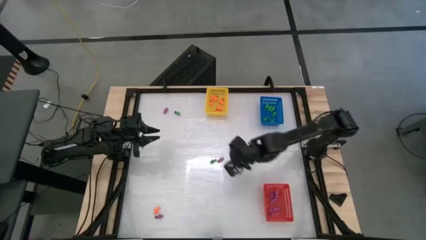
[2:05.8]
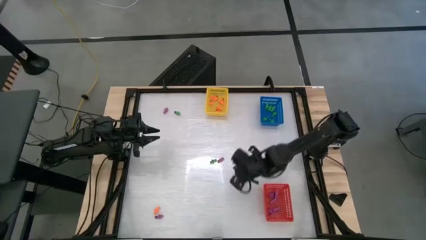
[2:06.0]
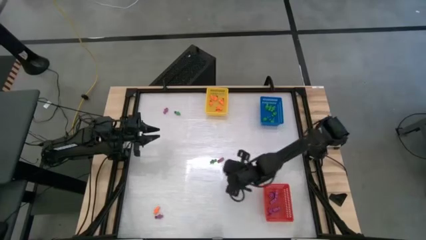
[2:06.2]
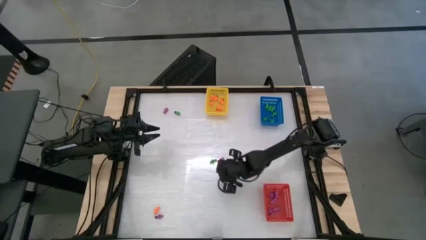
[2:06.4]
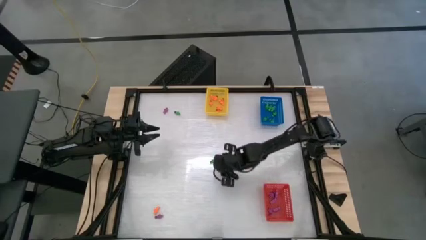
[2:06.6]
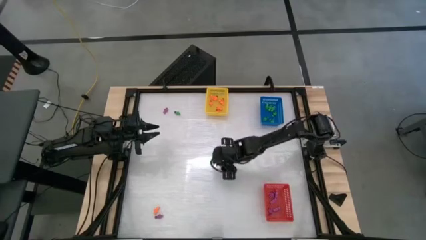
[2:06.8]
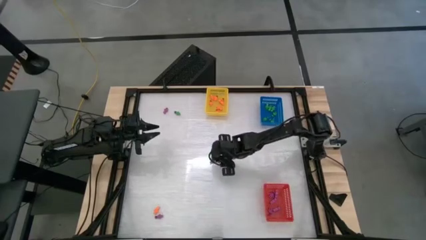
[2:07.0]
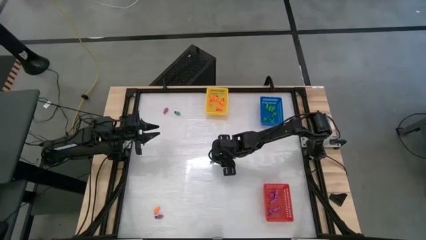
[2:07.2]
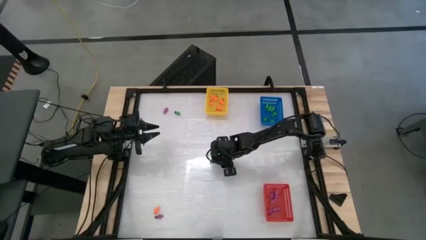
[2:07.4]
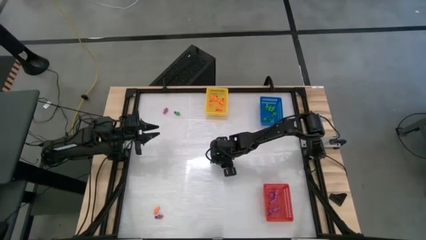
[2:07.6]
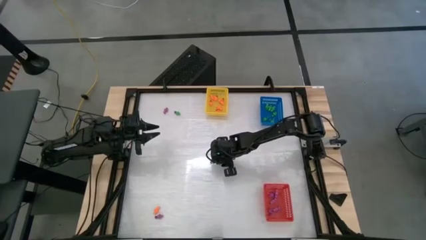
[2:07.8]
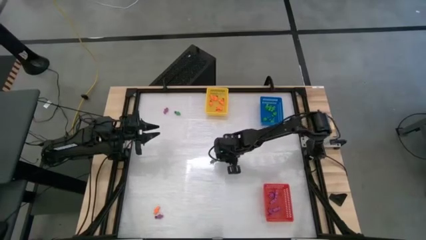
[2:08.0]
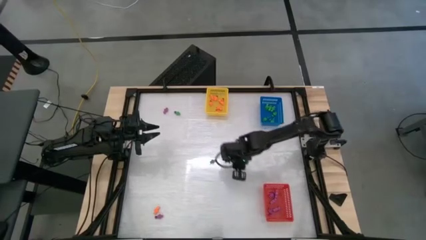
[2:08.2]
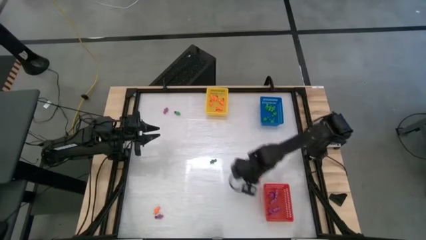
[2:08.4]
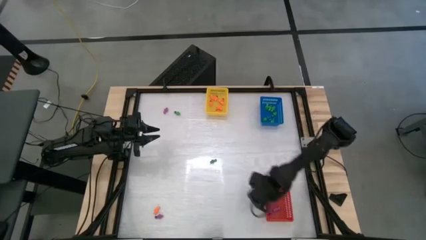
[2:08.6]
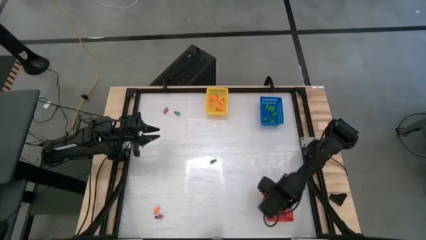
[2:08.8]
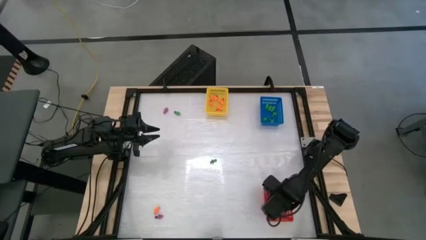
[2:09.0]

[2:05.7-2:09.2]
Task: Sort Halloween decoration
Put the violet skeleton toy into the red bin

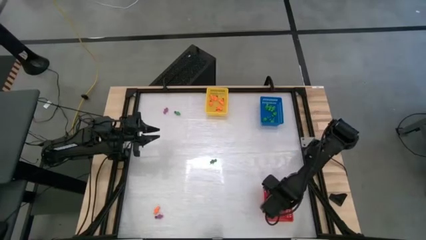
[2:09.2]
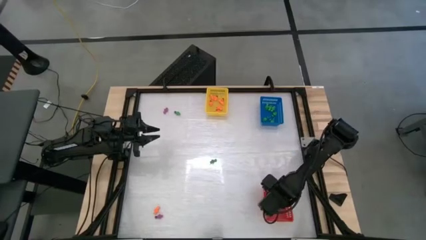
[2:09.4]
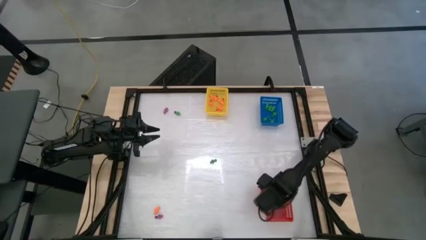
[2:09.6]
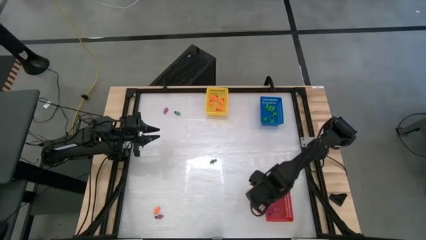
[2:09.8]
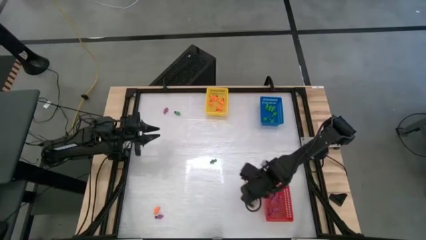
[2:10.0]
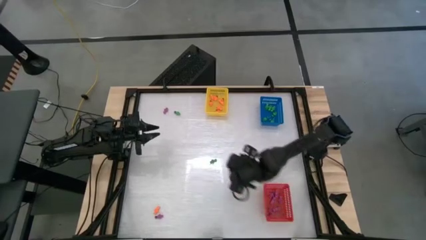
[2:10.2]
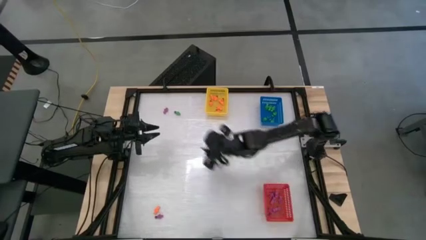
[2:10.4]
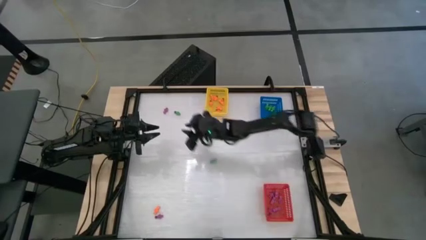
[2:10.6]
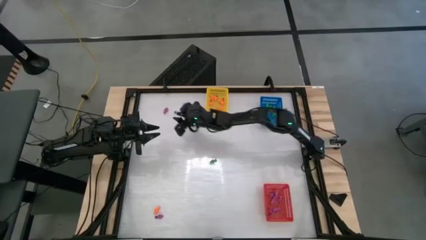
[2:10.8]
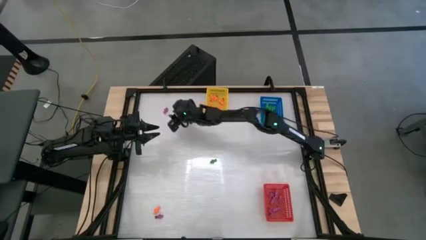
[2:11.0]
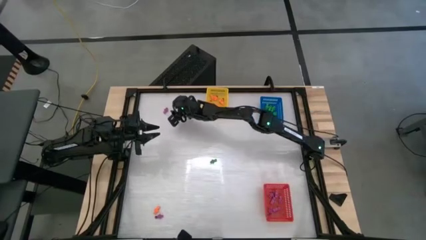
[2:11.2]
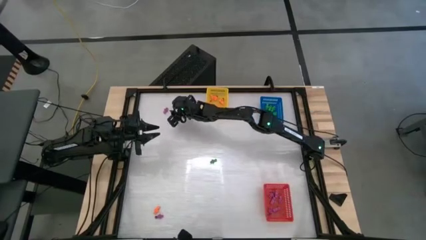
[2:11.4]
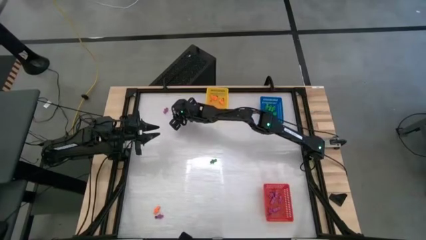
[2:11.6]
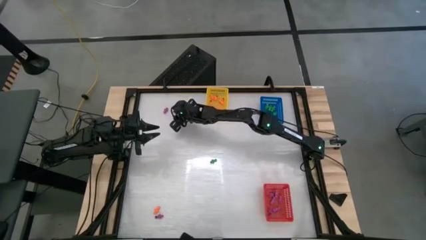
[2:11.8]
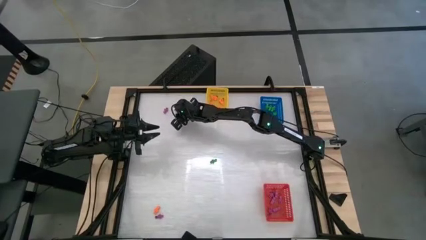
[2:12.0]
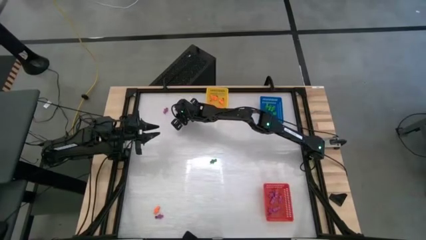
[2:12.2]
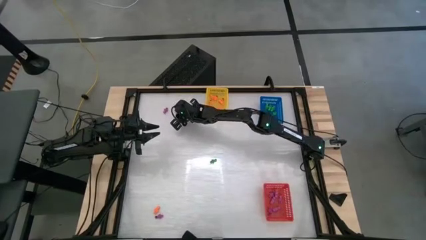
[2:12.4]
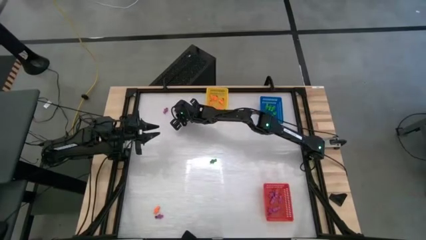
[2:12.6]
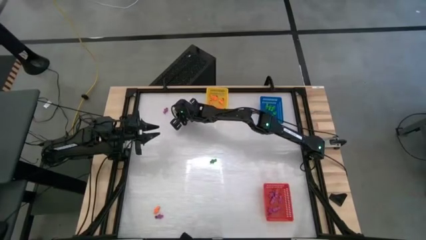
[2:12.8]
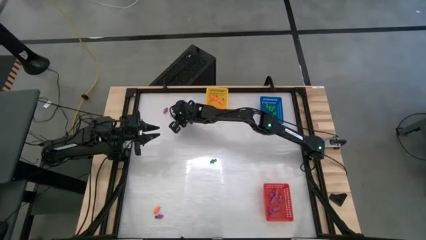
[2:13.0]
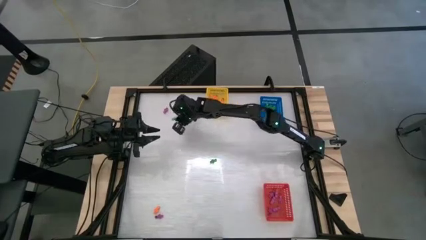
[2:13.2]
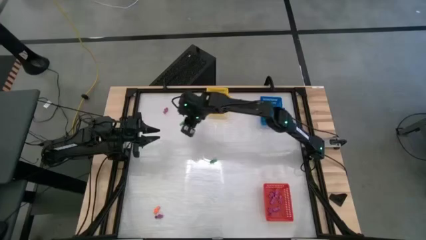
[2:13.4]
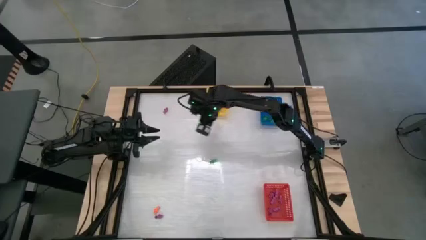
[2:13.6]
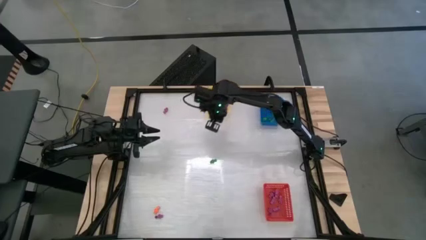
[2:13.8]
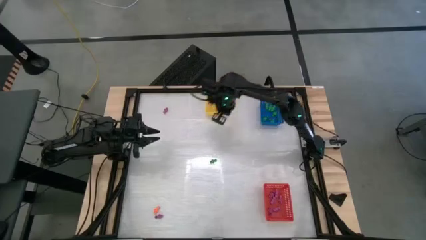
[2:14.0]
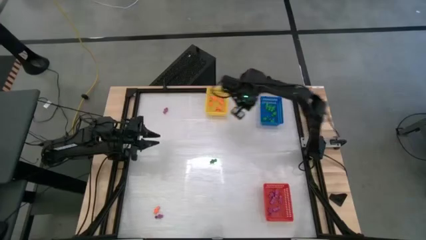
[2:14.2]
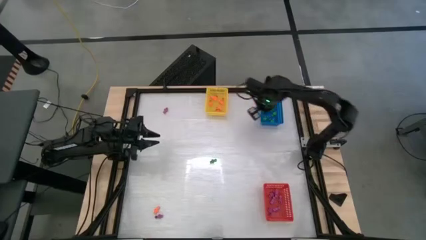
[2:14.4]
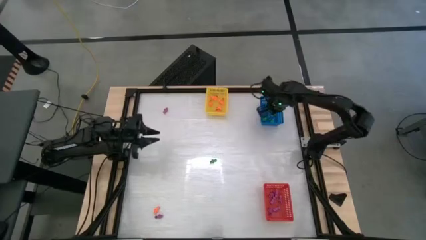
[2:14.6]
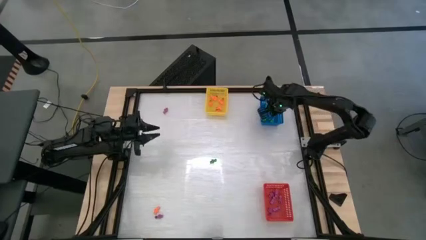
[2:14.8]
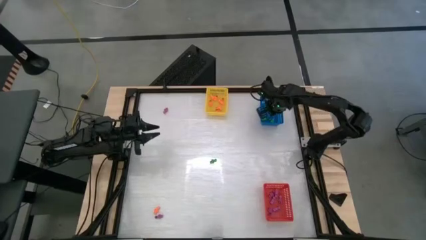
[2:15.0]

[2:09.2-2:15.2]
Put the green skeleton toy into the blue bin

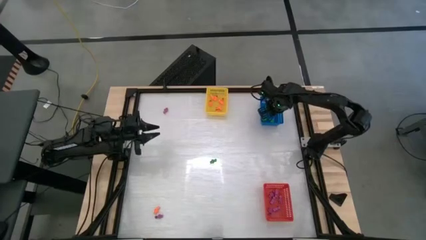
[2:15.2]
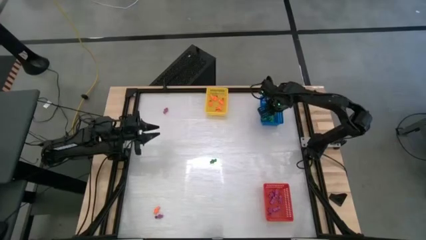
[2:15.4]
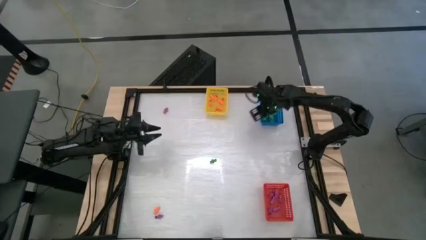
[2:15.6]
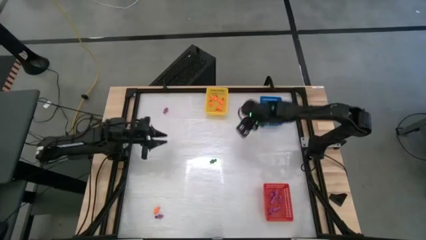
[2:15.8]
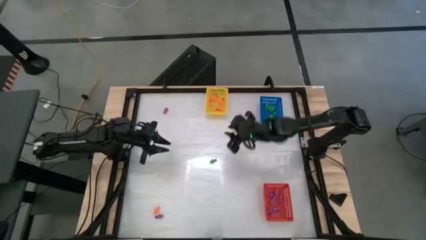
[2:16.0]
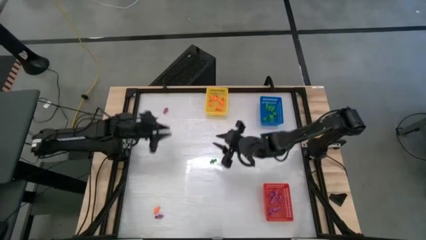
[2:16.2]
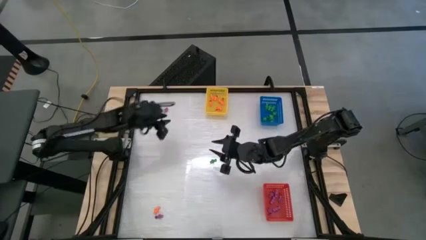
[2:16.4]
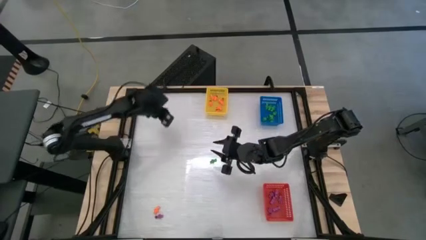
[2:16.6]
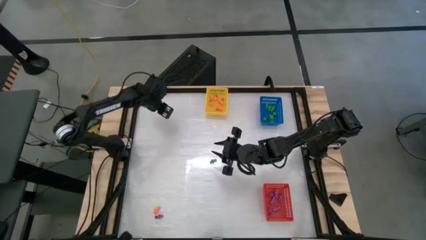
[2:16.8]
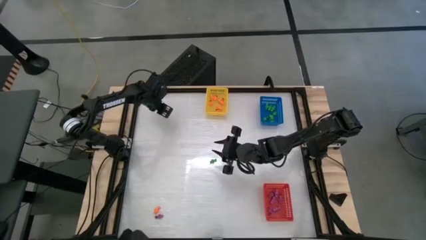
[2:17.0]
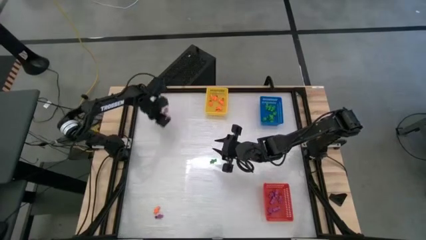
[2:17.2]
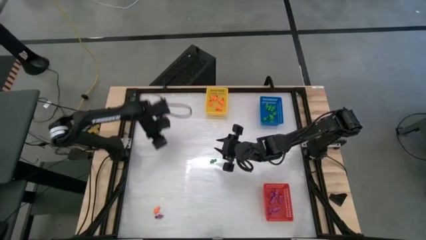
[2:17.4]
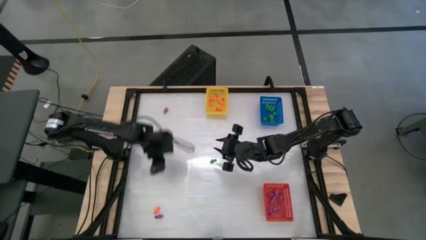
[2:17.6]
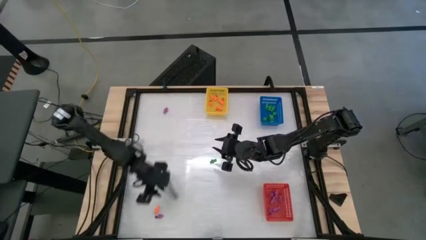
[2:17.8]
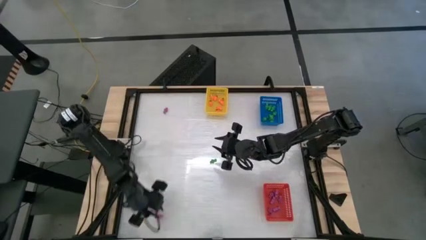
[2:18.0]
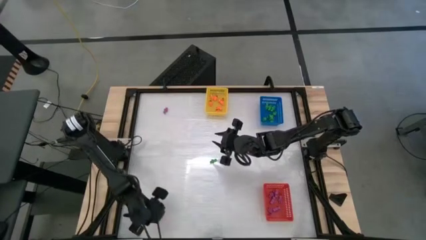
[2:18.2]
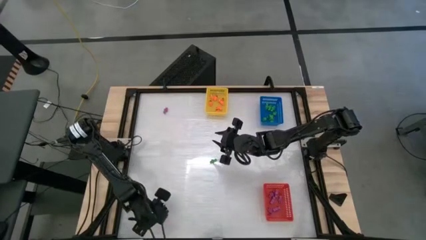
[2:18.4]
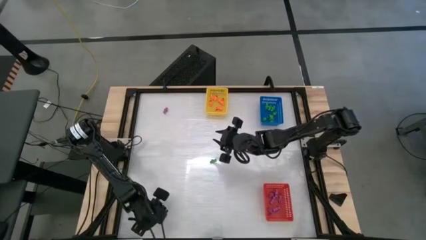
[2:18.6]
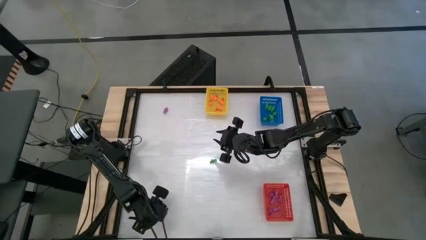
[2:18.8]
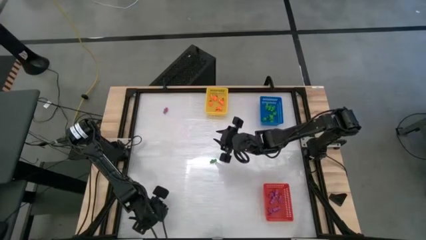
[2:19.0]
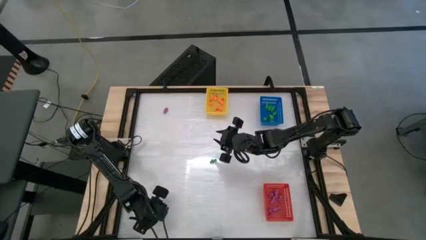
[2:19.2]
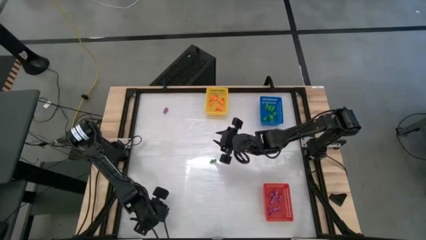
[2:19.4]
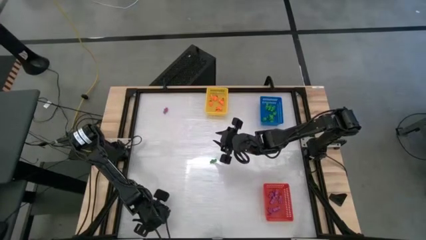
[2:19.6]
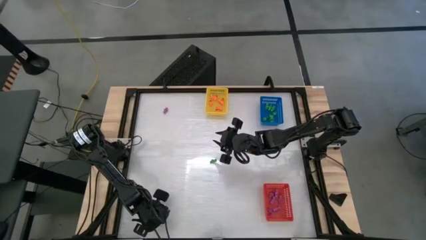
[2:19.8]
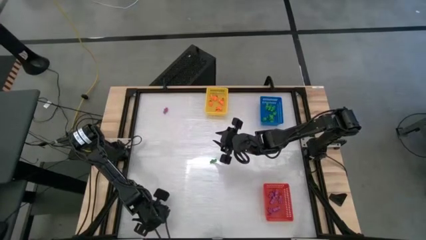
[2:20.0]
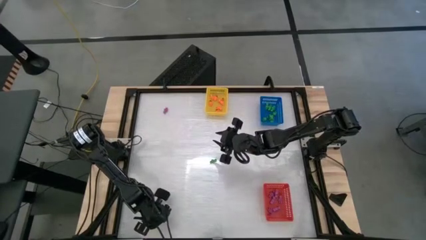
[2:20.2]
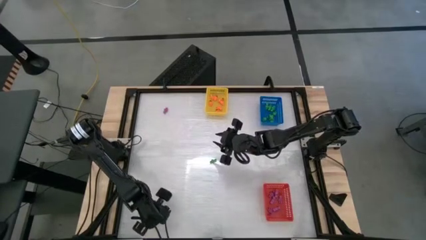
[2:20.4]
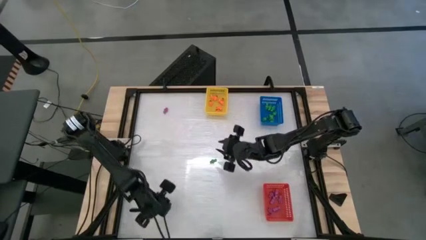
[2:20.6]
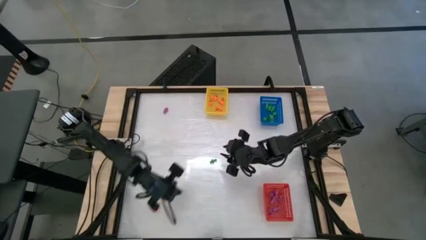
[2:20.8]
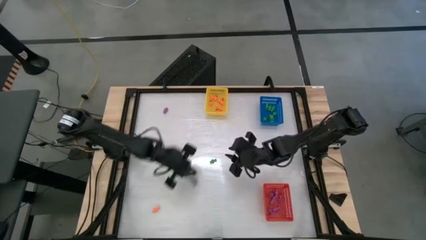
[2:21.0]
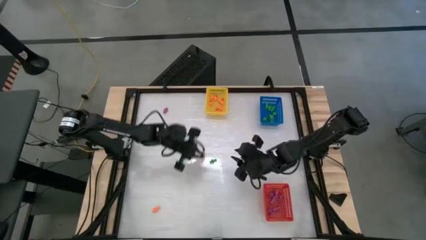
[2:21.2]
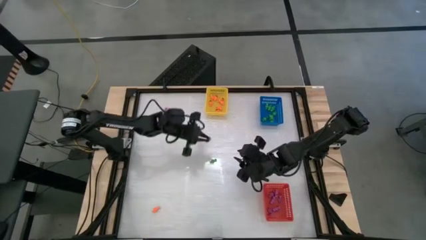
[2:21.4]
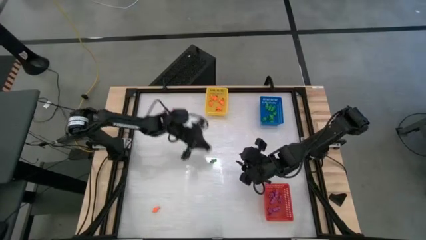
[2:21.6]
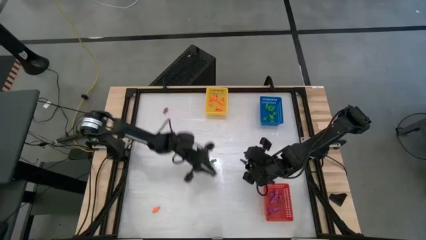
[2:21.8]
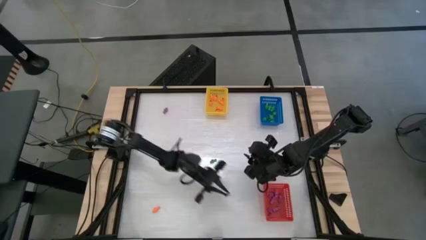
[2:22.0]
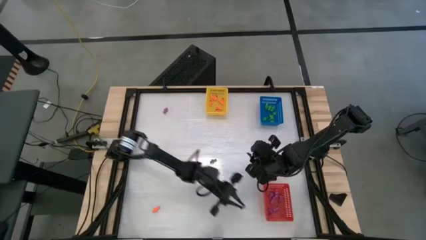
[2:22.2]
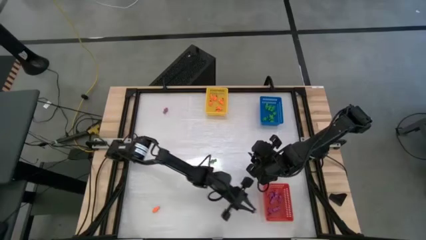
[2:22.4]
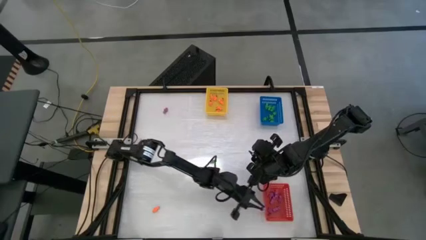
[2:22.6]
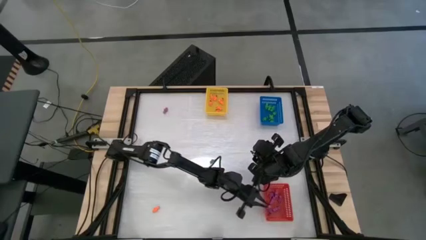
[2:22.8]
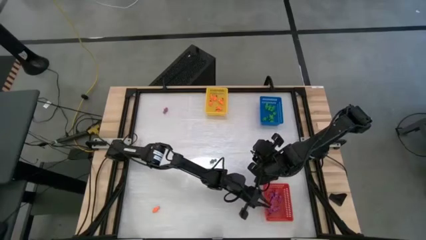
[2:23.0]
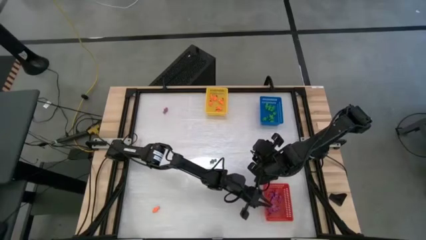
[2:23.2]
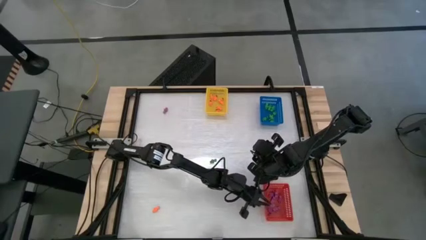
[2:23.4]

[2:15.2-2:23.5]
Put the violet skeleton toy into the red bin
